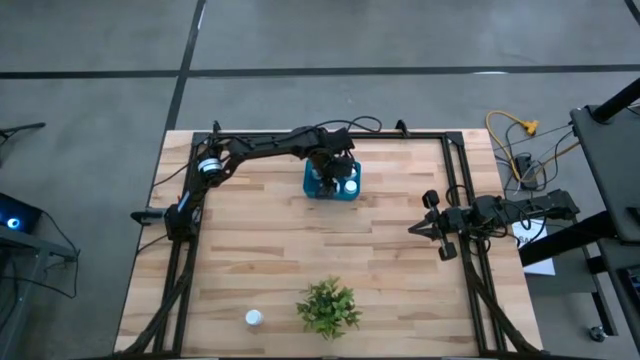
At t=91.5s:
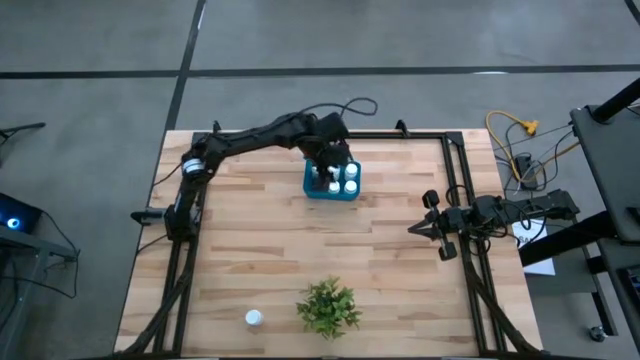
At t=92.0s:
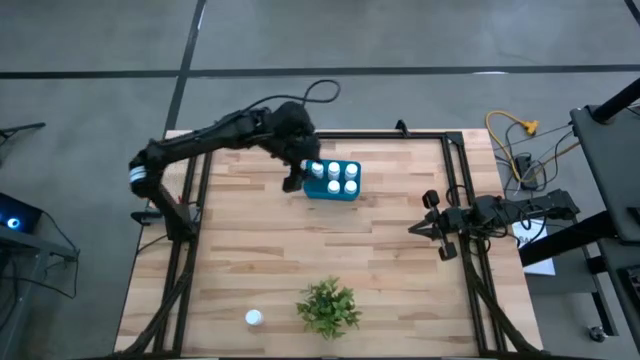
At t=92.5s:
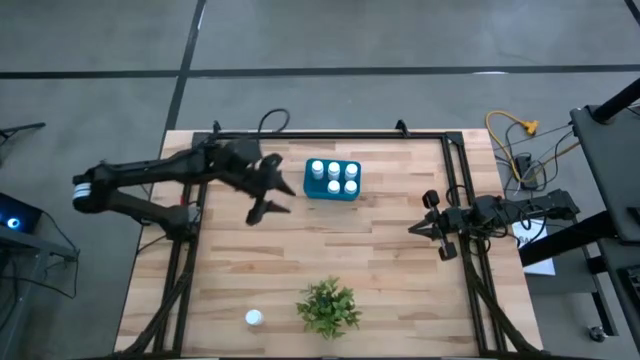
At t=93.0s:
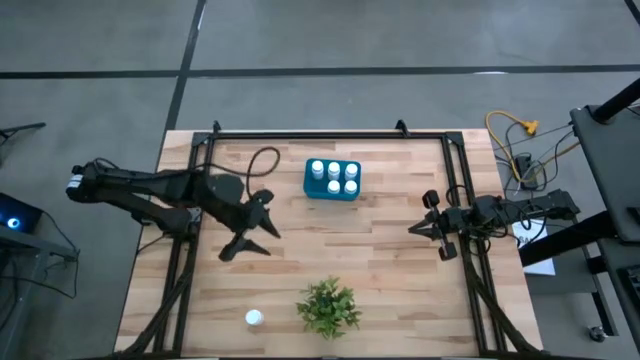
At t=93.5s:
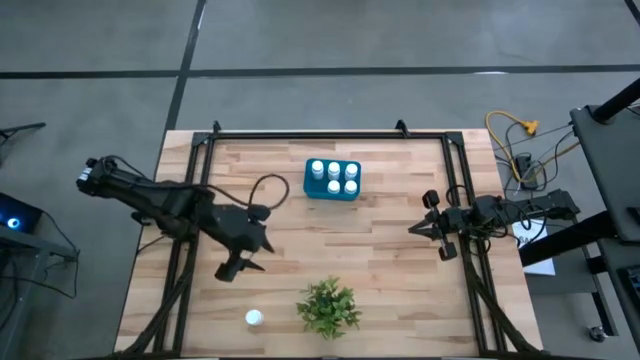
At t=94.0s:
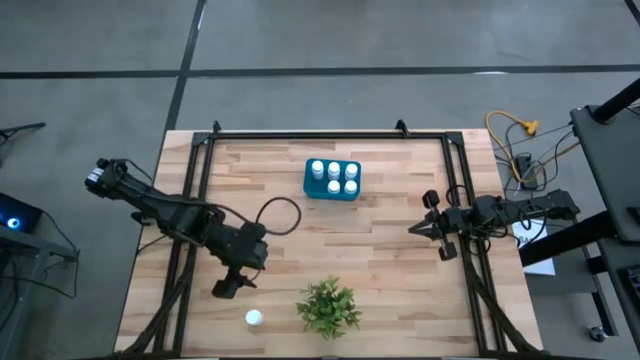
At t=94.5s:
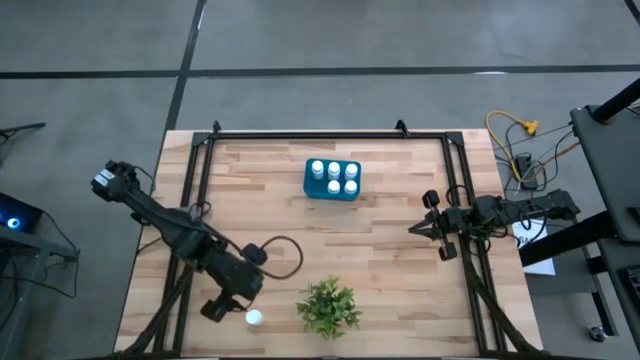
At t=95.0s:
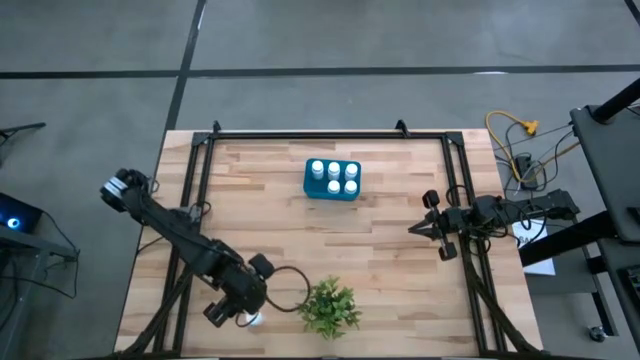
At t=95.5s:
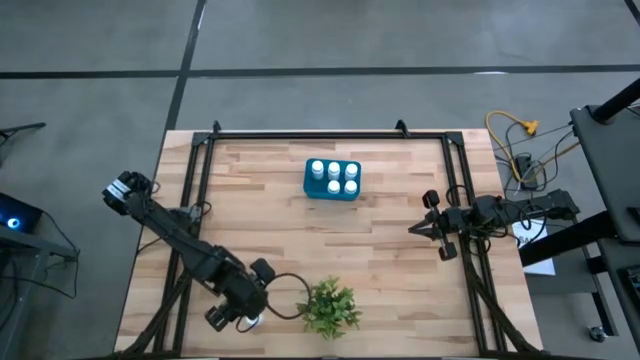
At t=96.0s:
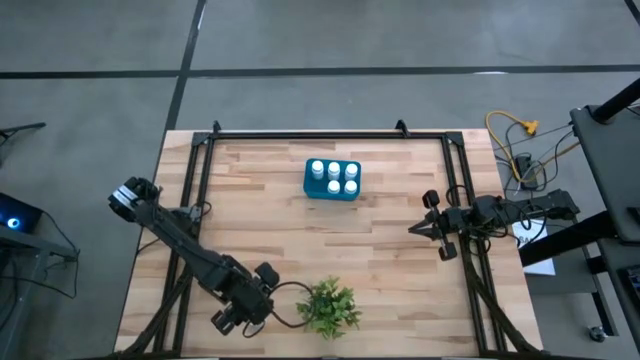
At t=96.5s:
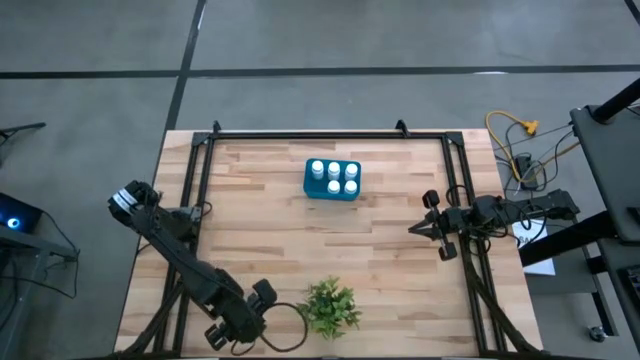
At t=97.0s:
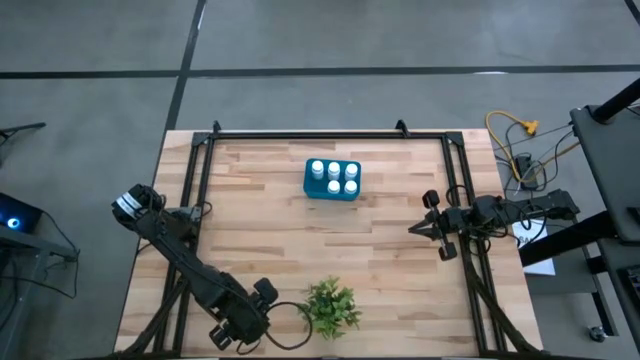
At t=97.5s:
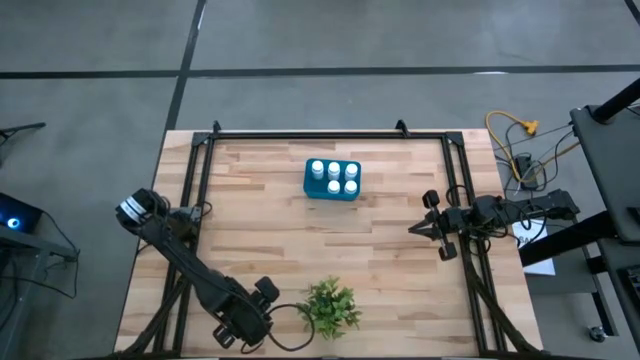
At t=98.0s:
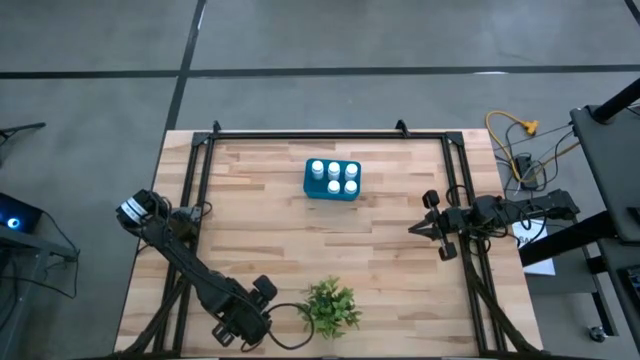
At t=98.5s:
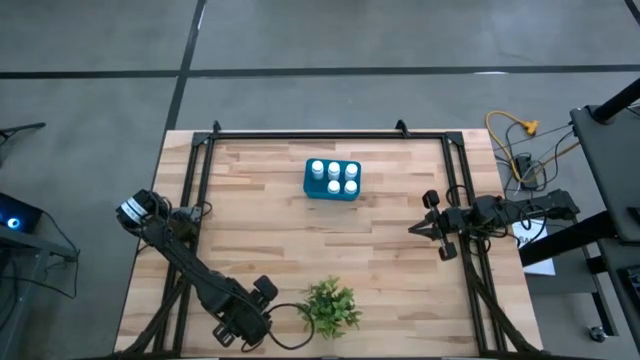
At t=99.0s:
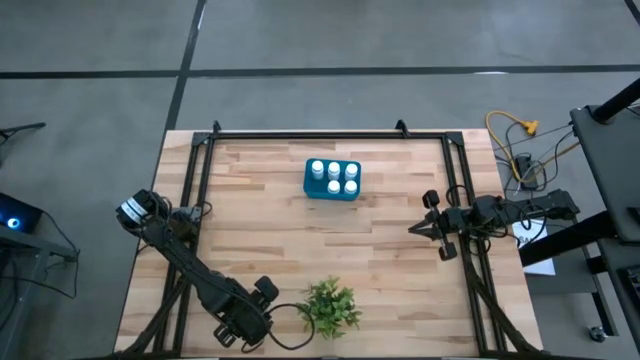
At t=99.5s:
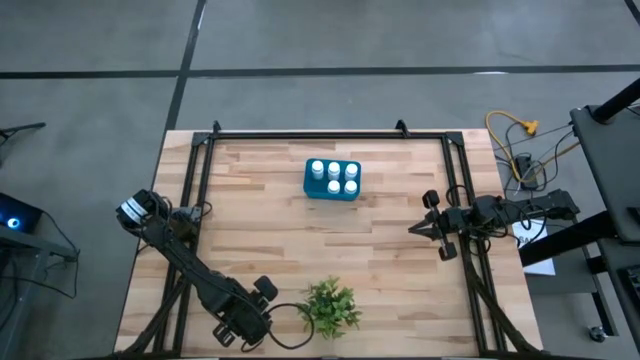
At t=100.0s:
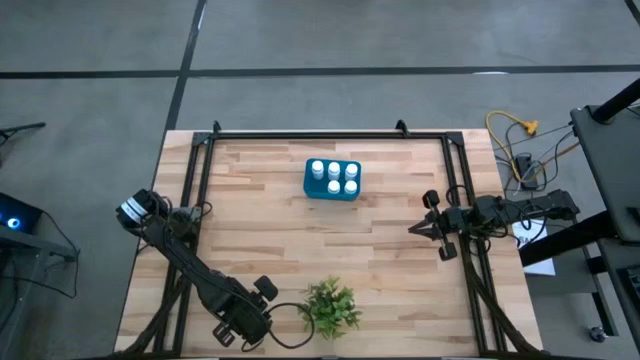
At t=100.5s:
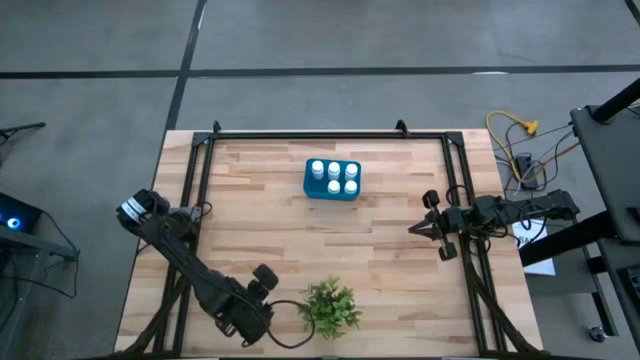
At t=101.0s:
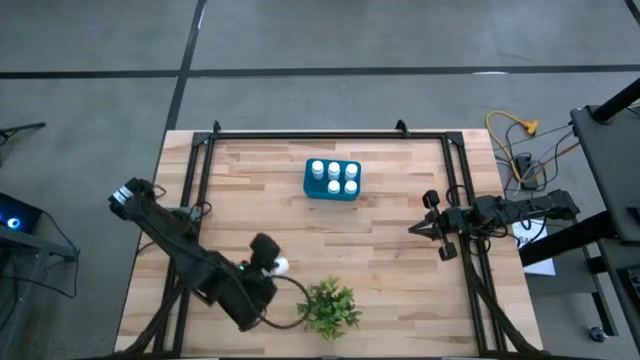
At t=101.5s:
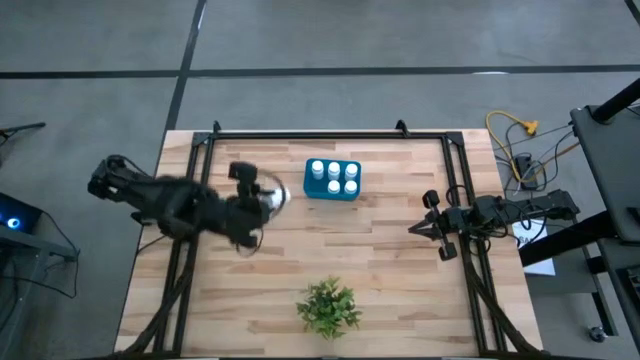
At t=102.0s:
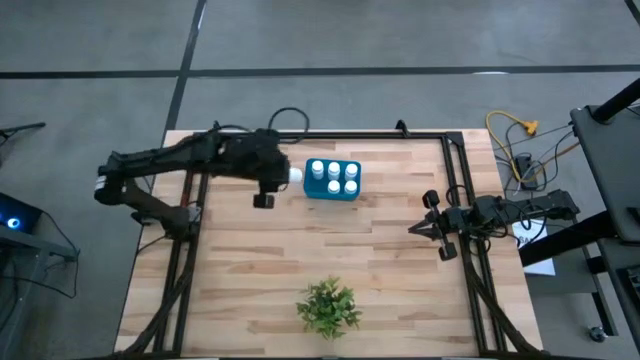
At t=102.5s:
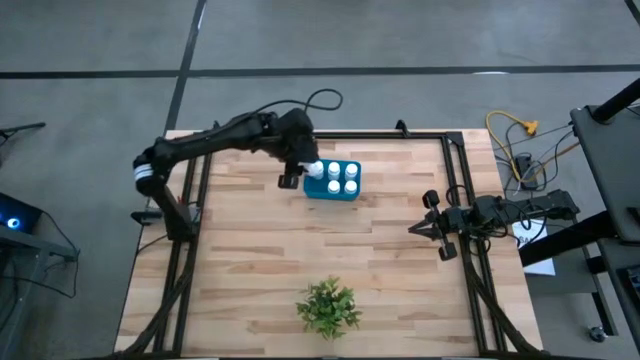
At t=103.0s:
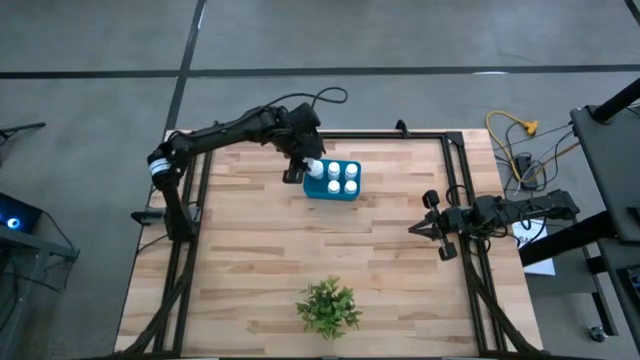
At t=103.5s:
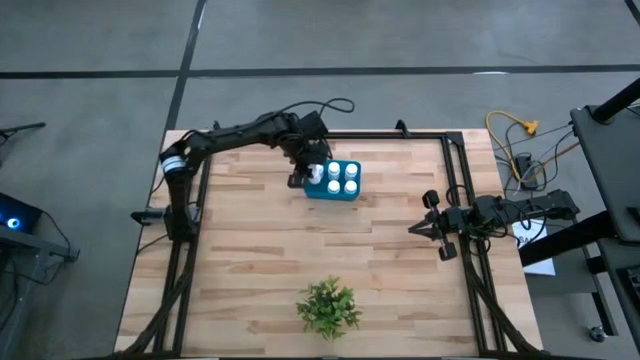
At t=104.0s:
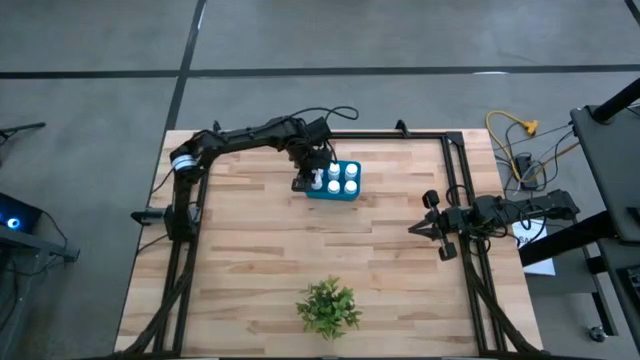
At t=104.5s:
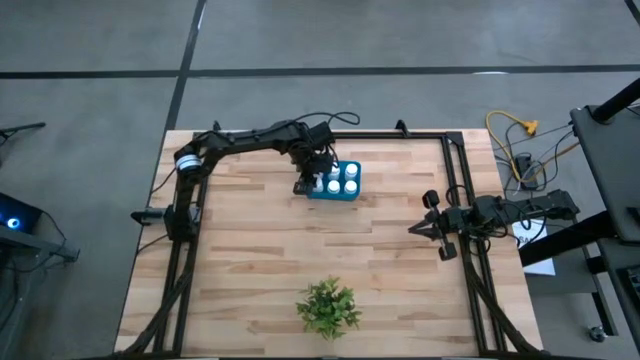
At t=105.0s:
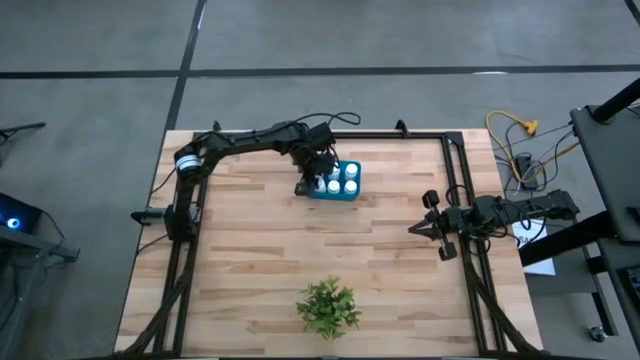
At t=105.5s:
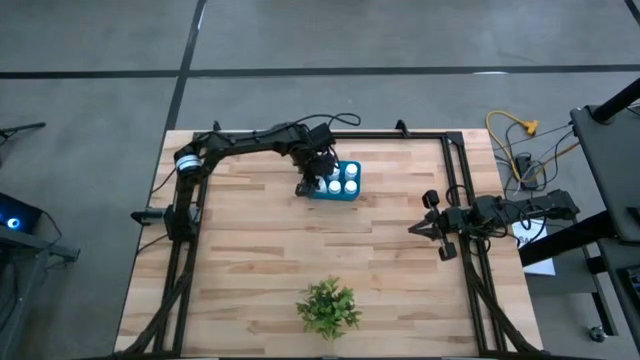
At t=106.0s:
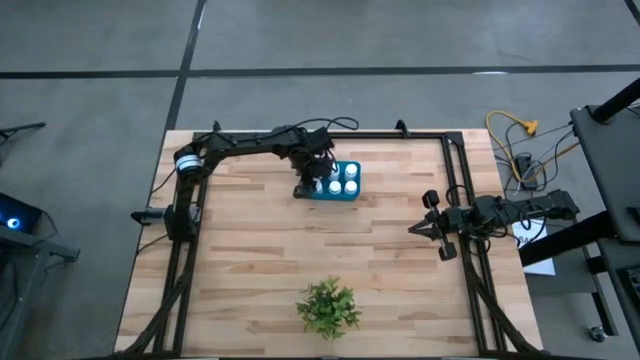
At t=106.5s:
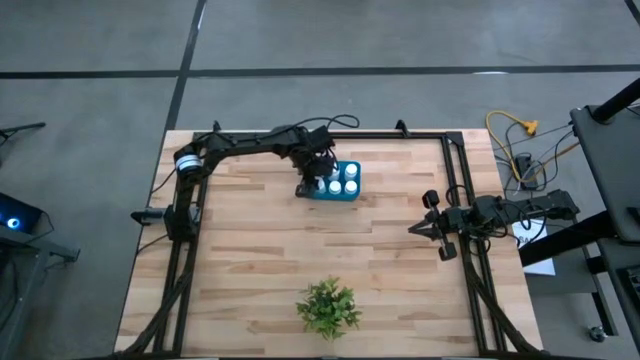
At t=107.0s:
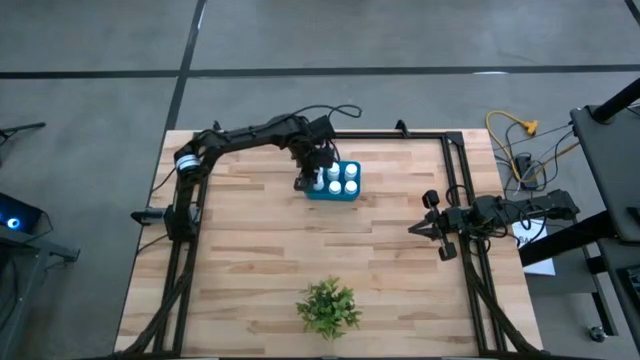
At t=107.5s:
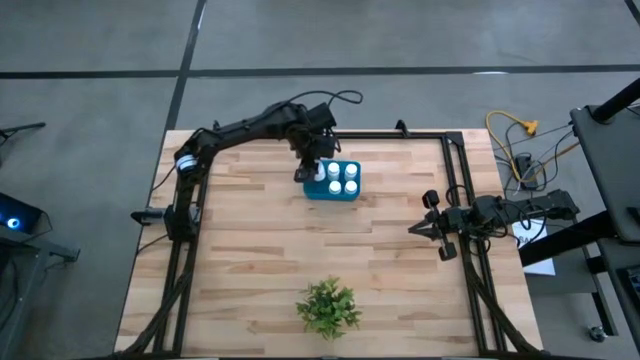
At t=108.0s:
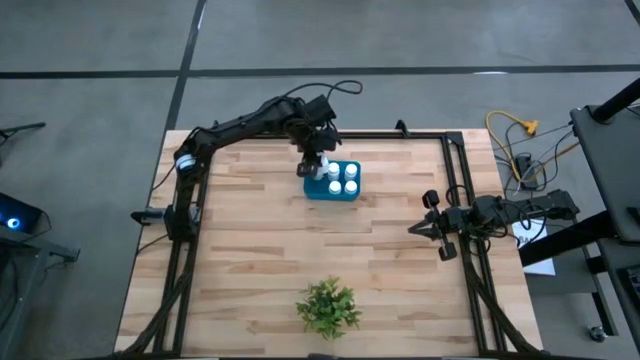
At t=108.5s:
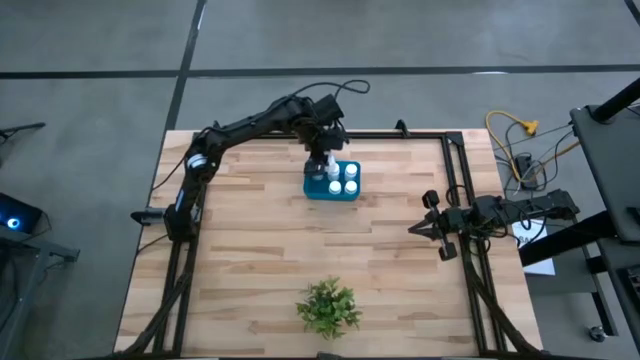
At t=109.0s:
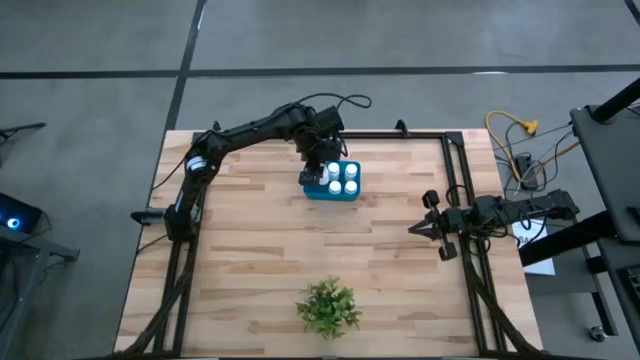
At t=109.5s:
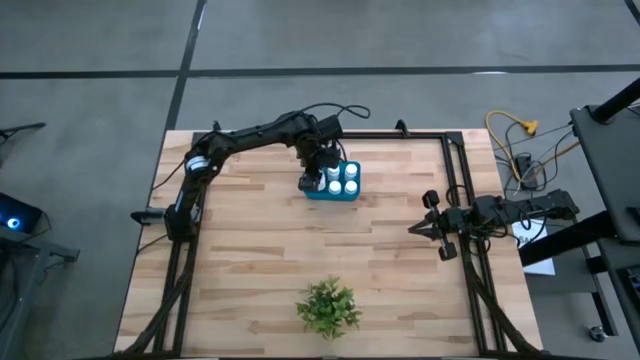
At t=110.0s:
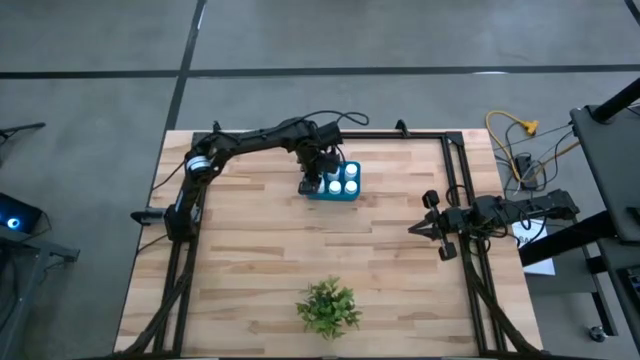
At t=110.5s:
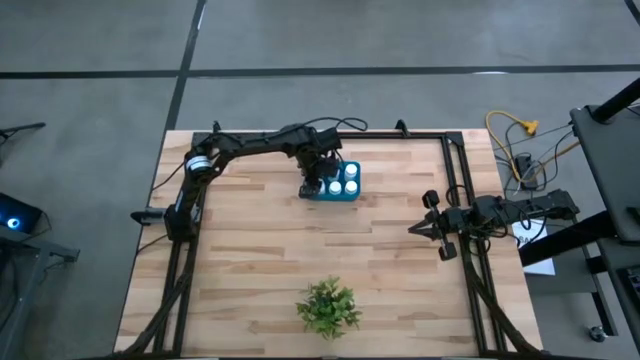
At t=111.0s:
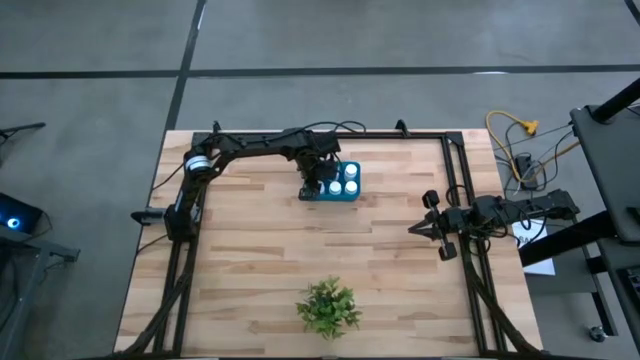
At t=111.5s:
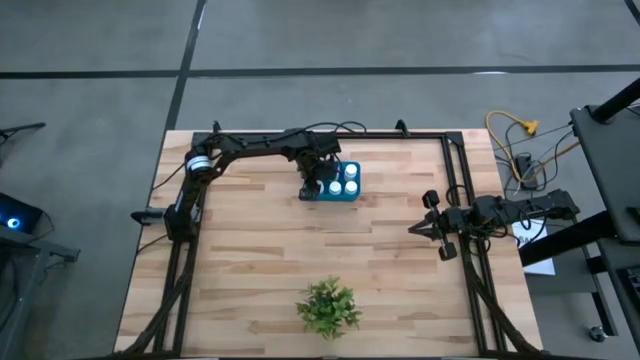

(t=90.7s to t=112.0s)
Task: Pick and place pill bottles into a basket
Put the white pill bottle into the blue bin
